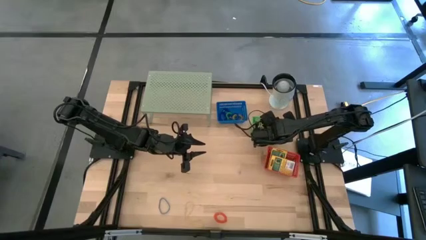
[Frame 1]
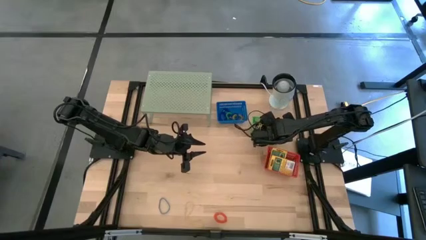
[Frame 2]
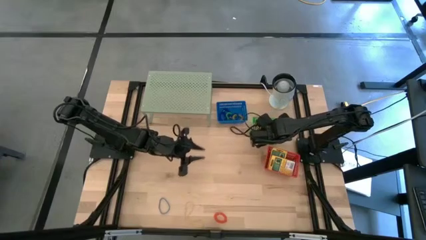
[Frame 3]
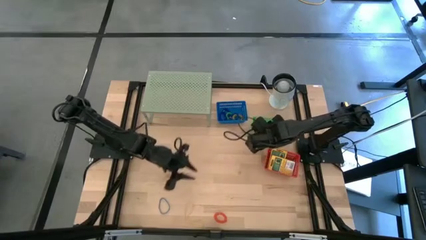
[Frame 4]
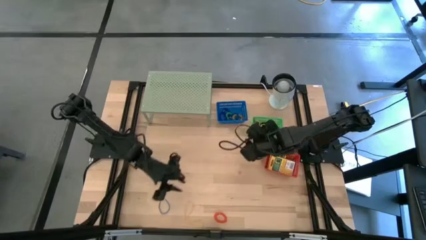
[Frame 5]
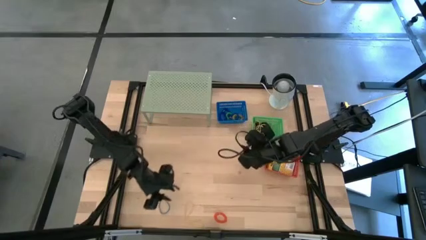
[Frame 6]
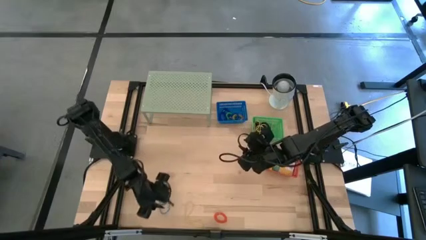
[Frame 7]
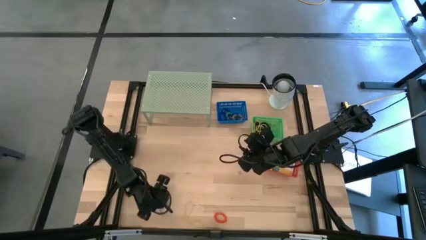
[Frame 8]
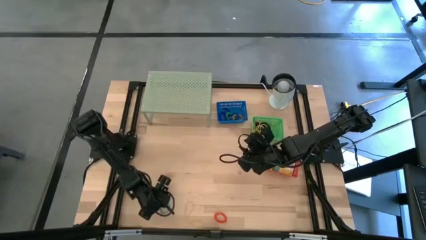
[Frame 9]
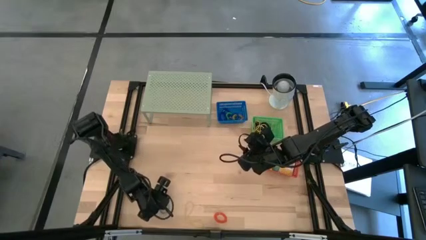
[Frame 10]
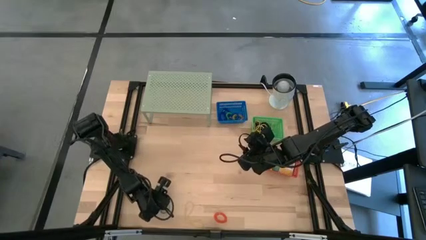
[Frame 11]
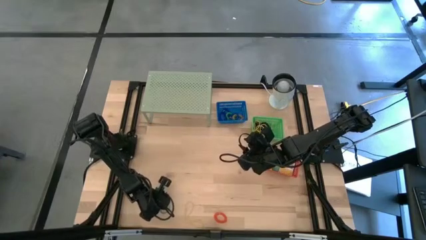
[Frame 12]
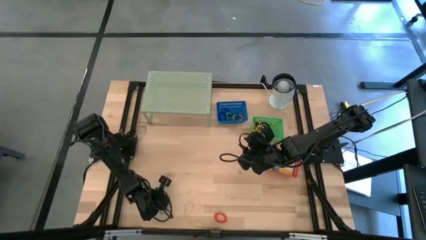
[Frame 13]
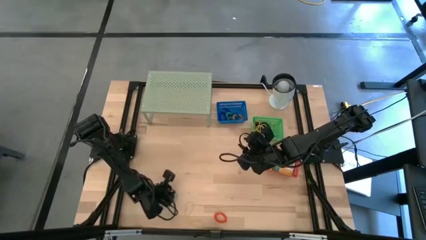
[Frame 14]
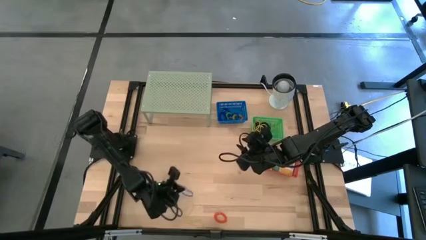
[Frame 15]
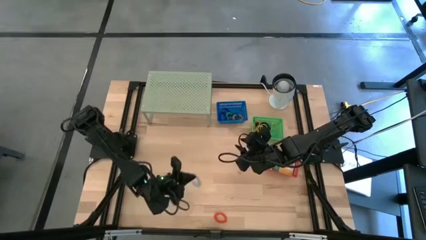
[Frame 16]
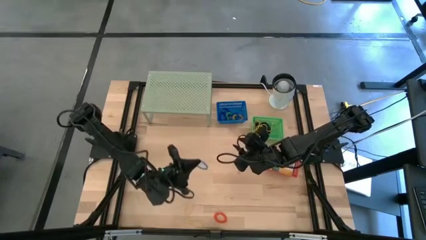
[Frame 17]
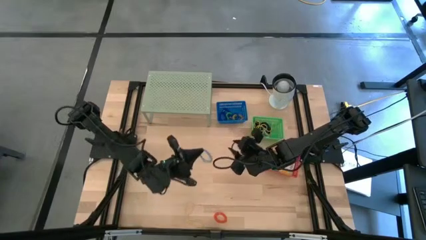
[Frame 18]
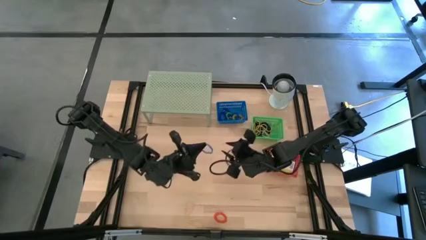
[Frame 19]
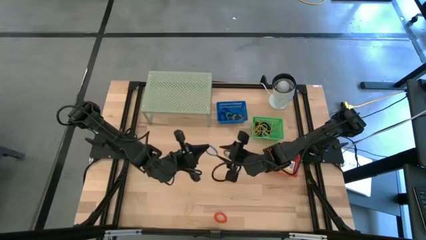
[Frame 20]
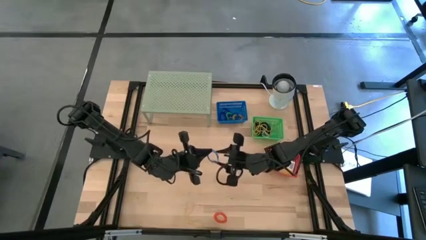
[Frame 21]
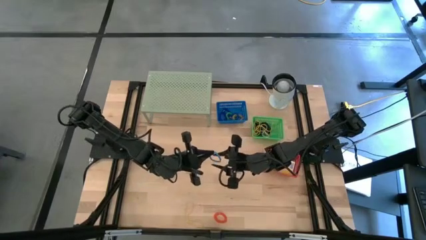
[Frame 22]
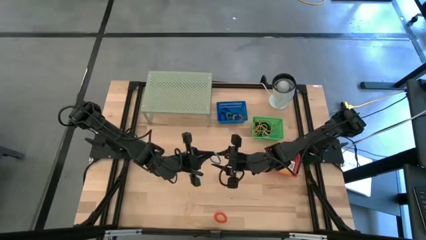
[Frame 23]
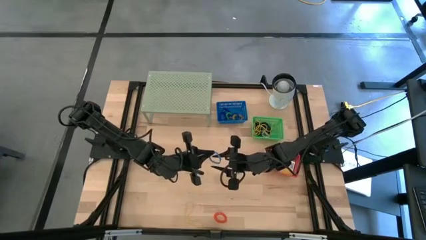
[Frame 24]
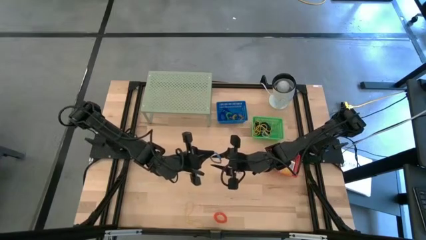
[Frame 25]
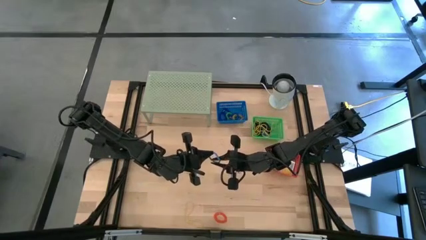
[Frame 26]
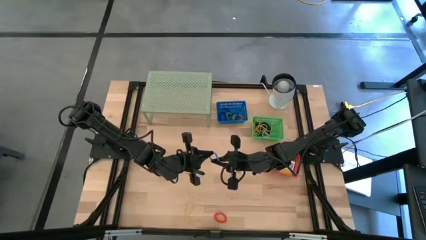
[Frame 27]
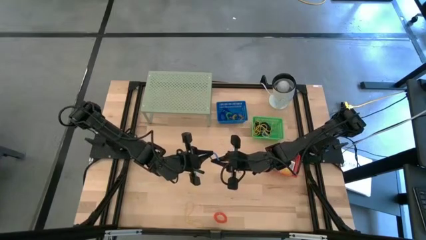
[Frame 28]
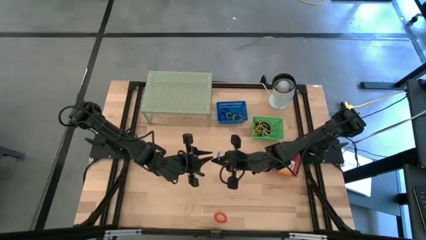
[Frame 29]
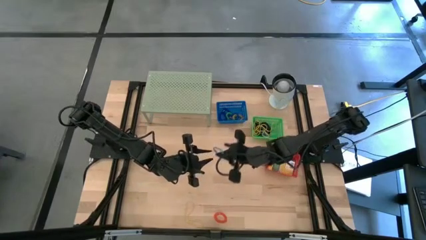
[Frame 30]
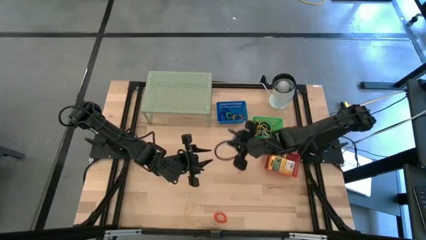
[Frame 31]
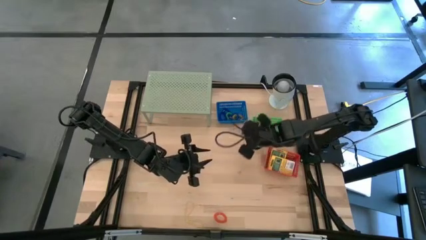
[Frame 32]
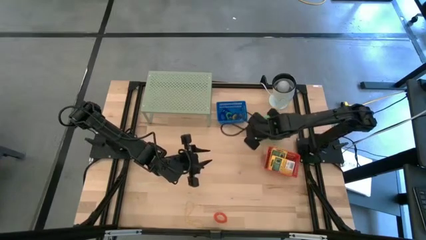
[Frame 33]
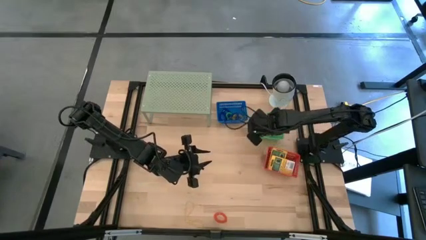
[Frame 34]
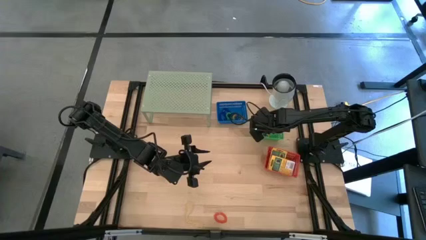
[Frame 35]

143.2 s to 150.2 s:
Task: Pick & Place Office Desk Supplies
Put the blue rubber band into the green bin

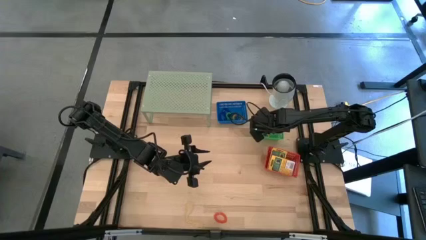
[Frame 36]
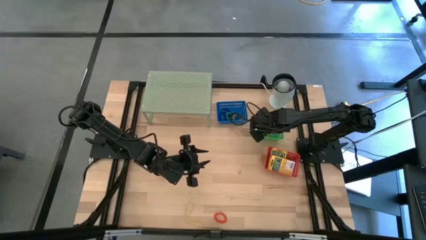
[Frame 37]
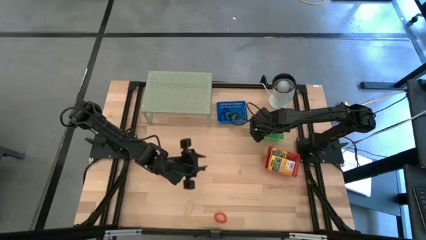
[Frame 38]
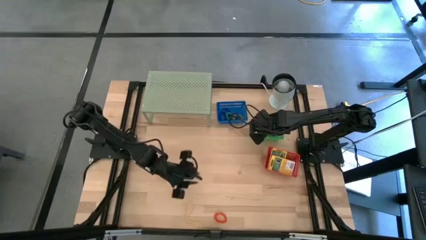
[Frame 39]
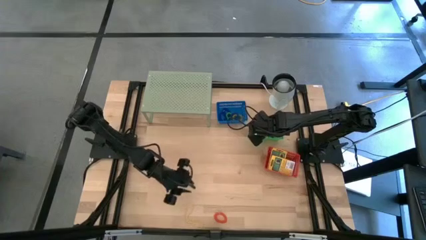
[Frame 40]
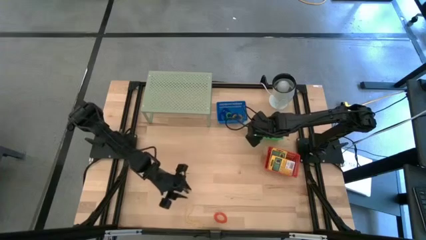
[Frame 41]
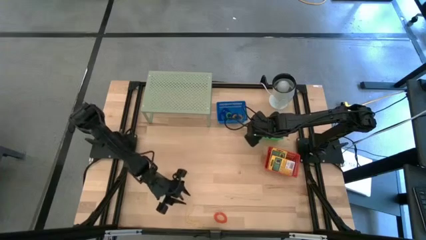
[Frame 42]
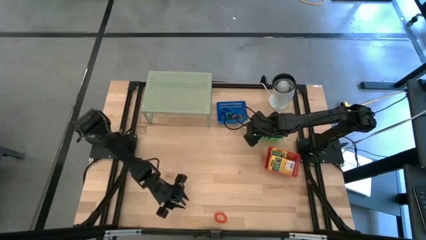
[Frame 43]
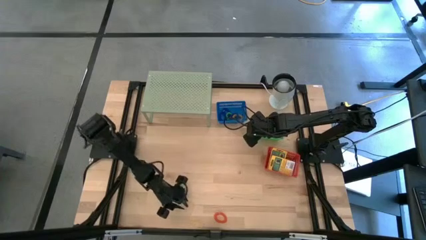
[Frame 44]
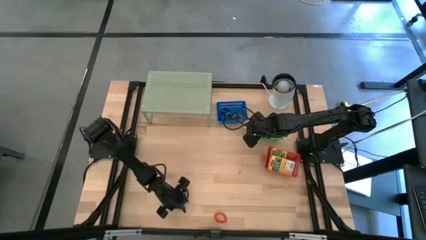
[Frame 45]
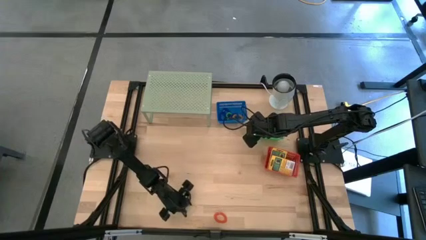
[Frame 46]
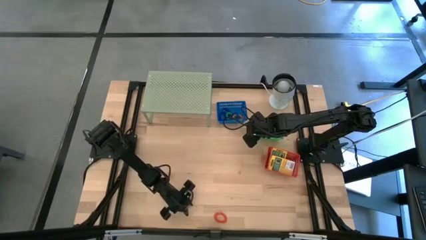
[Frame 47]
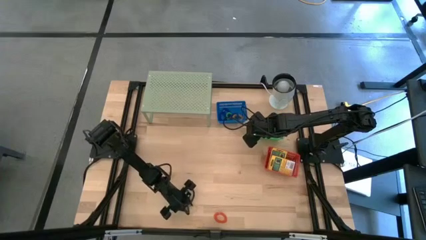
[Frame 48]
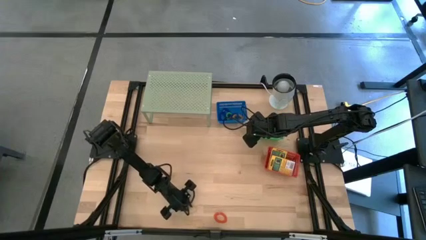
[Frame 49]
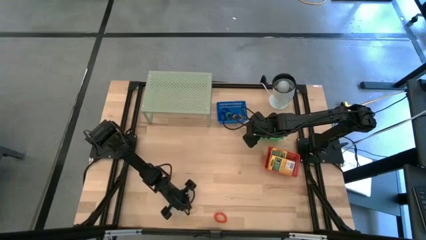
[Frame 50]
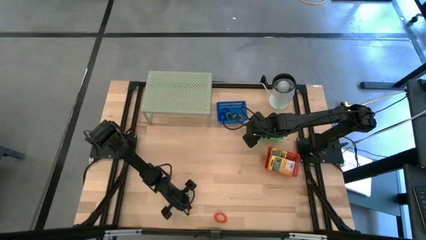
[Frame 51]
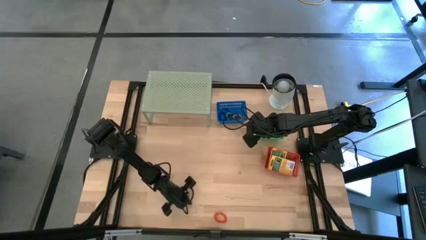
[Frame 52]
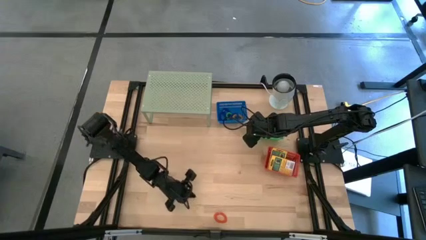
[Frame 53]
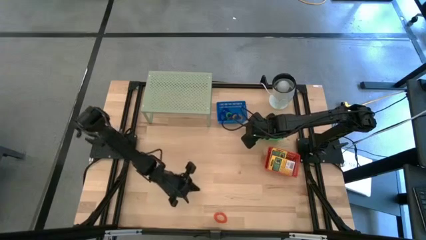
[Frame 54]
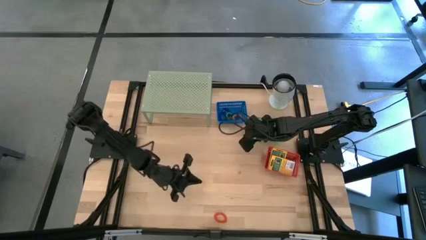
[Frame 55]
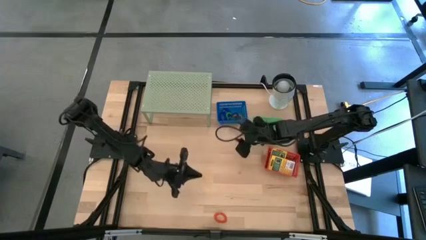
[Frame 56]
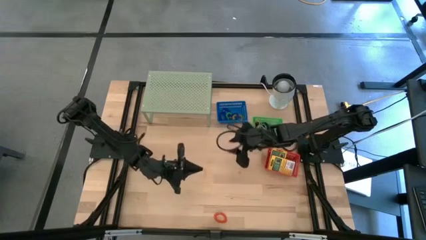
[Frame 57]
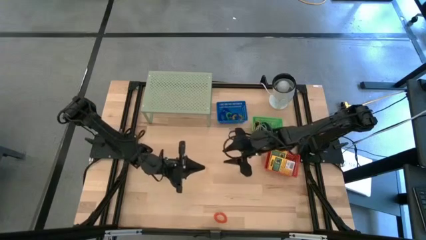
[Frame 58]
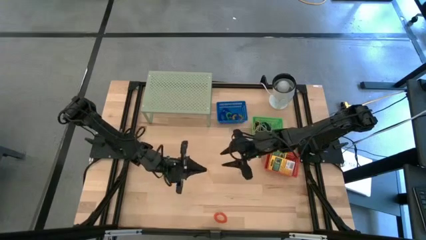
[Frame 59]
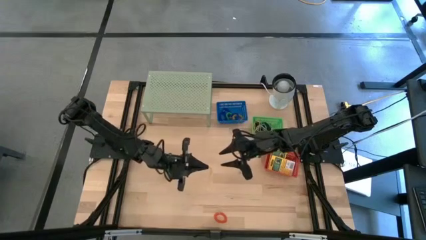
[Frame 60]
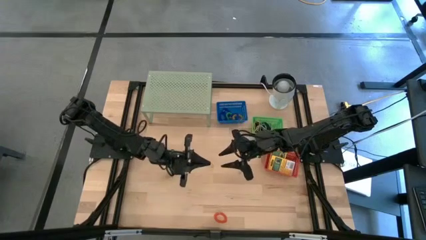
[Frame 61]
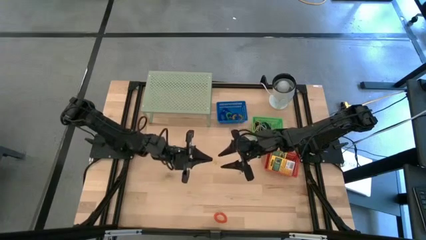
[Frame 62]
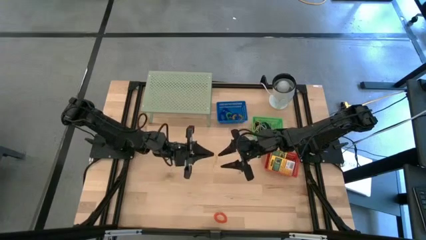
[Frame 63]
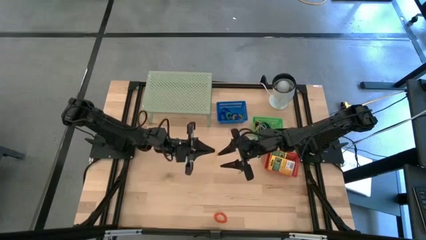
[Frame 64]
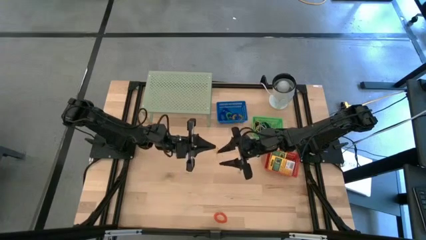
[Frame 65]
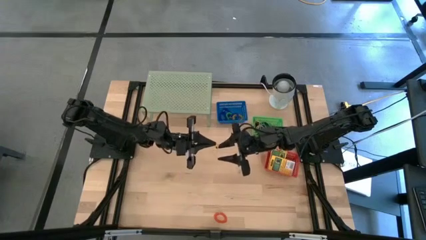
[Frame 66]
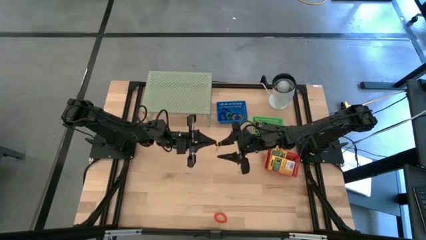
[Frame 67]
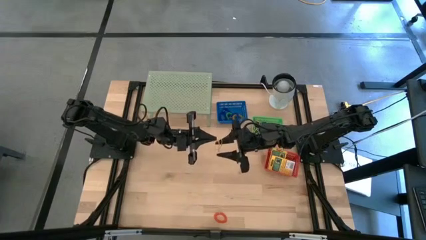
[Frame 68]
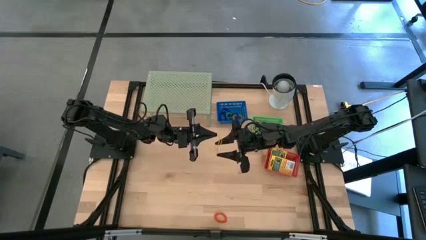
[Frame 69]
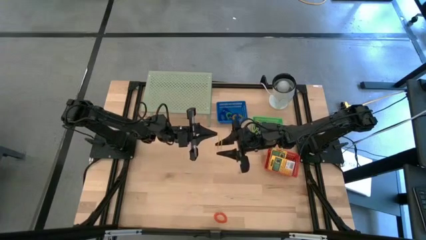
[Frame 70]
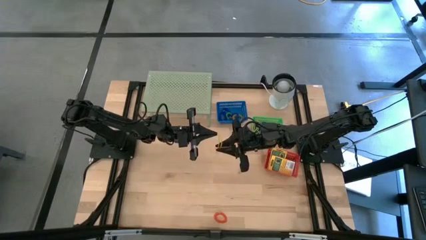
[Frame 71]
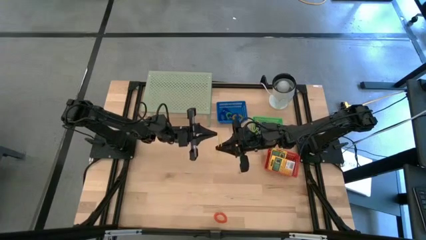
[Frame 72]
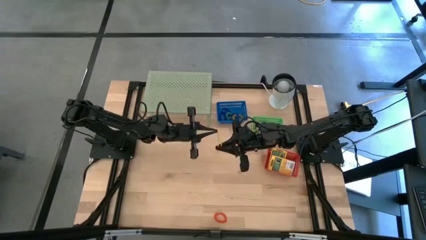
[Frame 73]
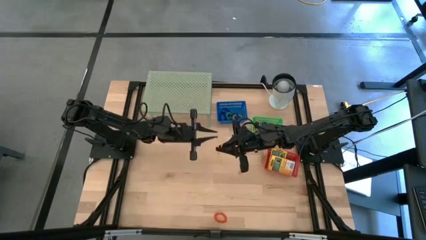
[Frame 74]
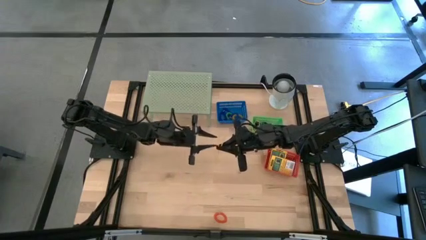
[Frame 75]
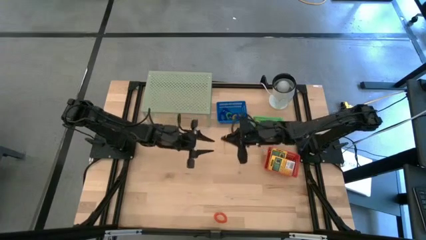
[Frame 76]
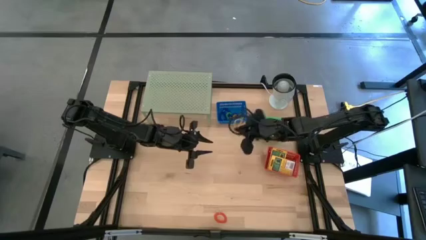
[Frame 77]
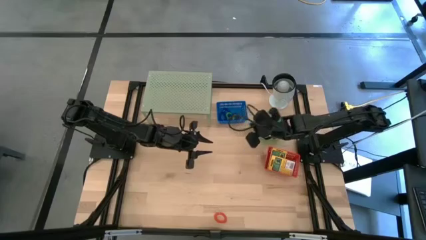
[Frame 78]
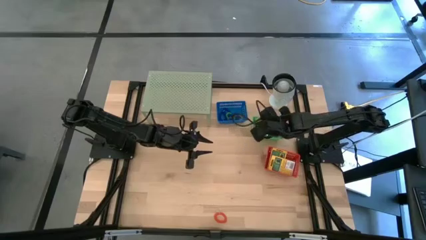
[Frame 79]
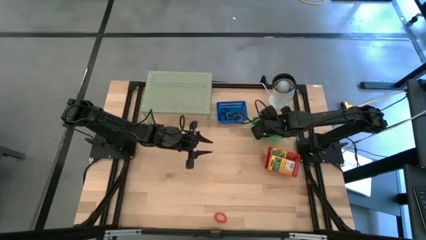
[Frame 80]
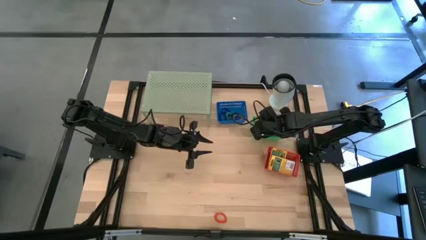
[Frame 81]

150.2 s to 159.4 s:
Put the yellow rubber band into the green bin

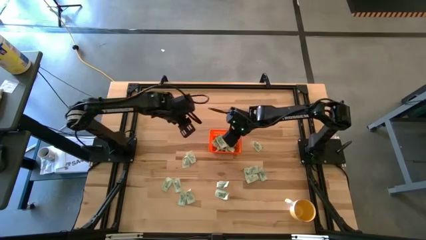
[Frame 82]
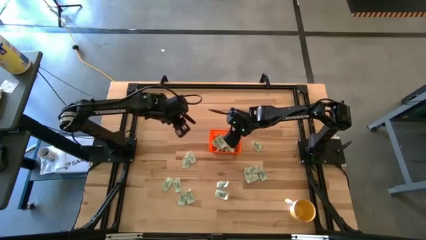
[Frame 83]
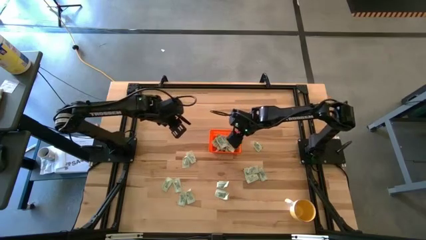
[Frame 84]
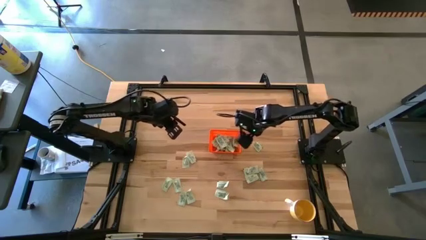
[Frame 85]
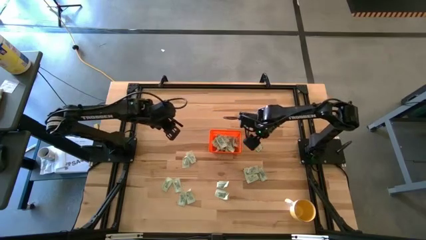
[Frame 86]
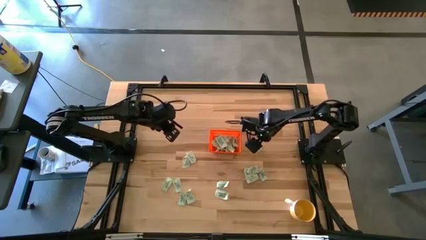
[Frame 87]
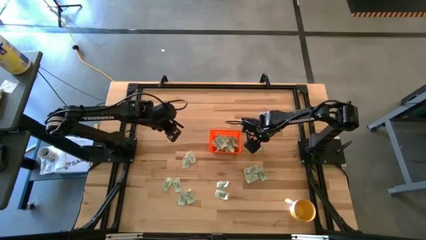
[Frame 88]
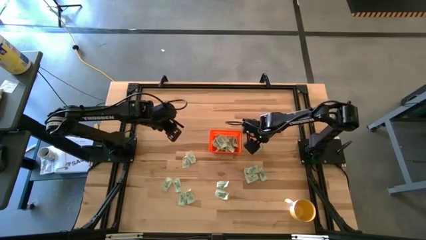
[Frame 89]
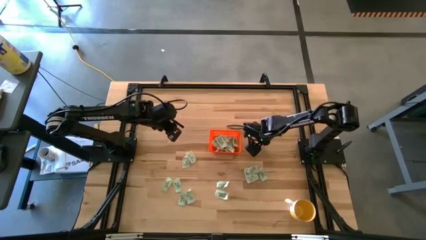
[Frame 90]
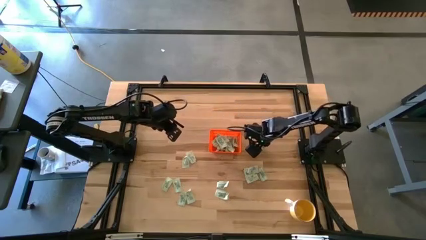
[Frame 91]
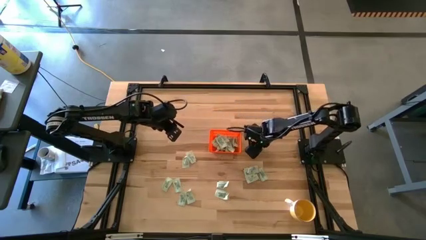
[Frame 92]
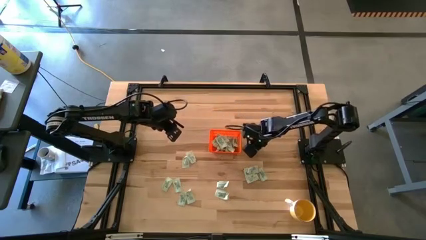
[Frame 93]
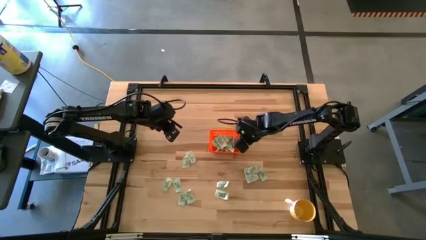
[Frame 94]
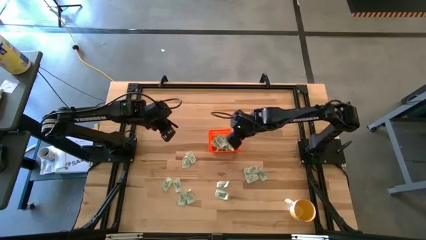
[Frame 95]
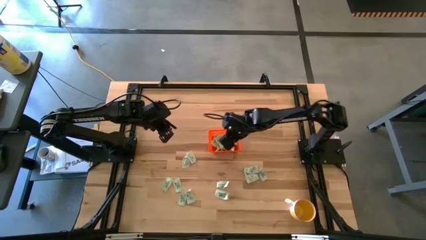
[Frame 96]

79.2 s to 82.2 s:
Task: Pick and place Stevia / Truvia into bins
Put the light green stevia packet into the orange basket
